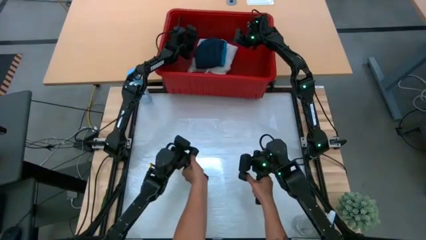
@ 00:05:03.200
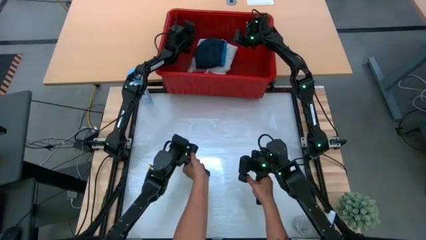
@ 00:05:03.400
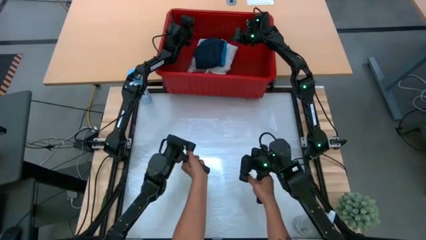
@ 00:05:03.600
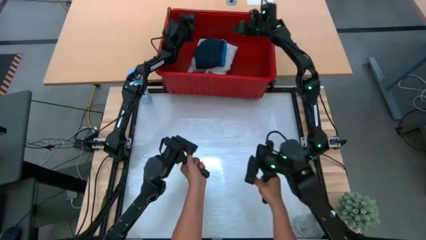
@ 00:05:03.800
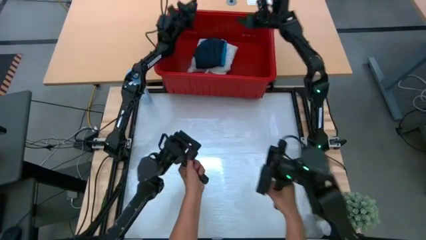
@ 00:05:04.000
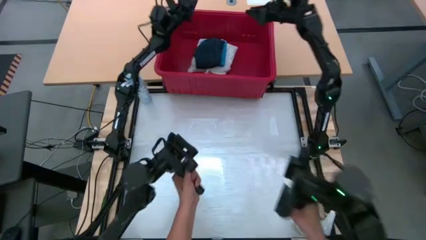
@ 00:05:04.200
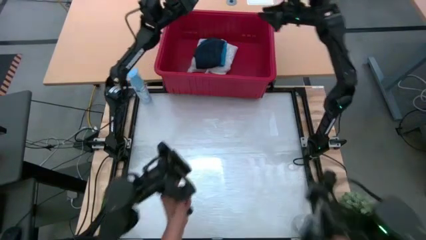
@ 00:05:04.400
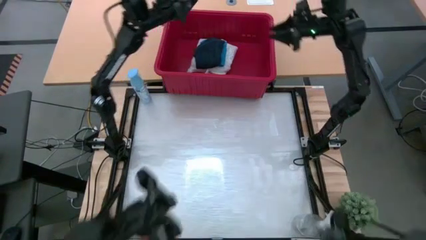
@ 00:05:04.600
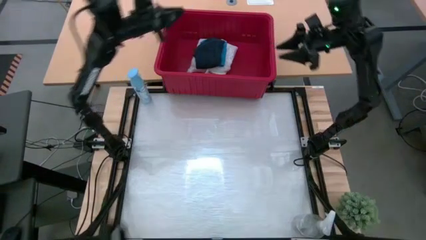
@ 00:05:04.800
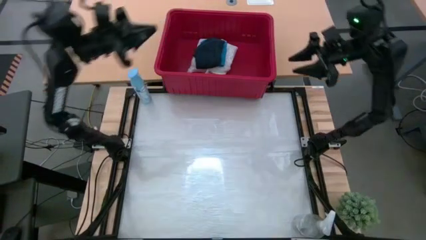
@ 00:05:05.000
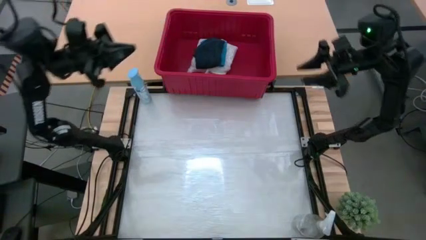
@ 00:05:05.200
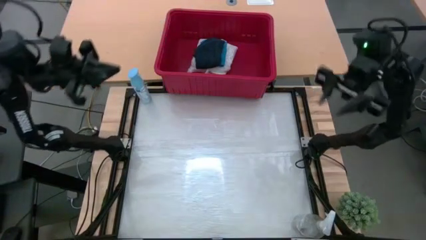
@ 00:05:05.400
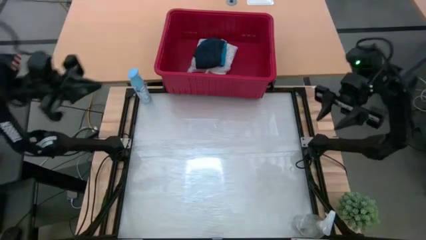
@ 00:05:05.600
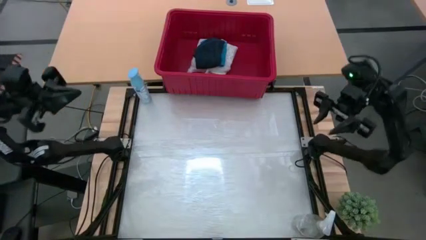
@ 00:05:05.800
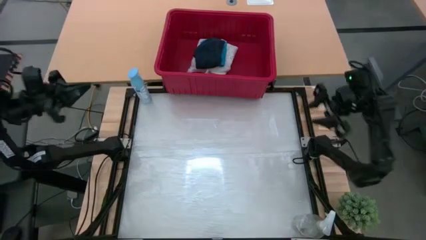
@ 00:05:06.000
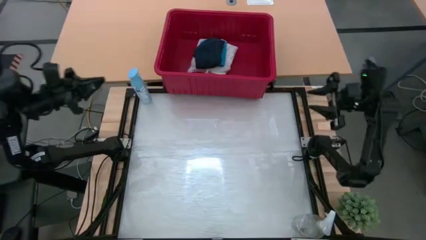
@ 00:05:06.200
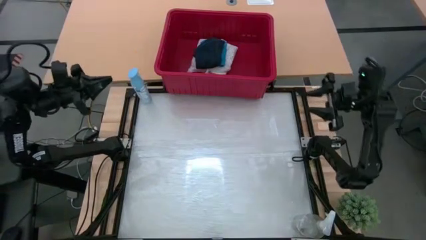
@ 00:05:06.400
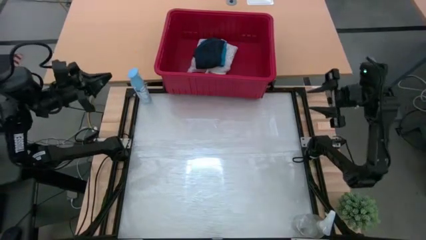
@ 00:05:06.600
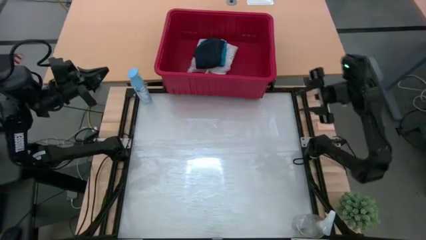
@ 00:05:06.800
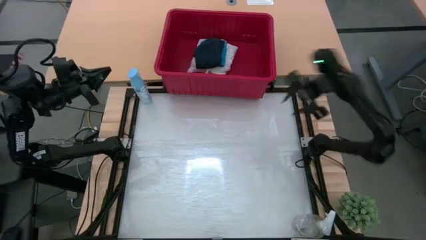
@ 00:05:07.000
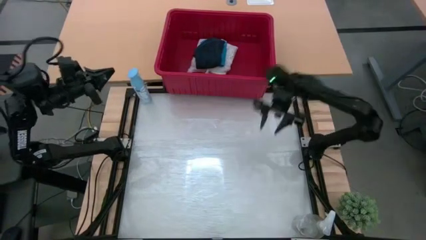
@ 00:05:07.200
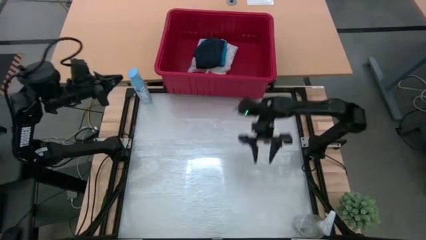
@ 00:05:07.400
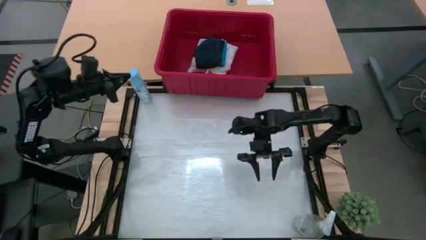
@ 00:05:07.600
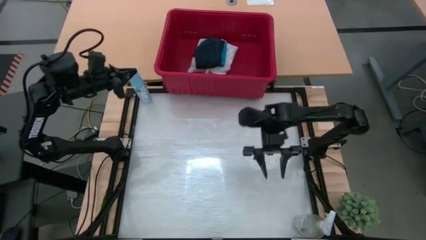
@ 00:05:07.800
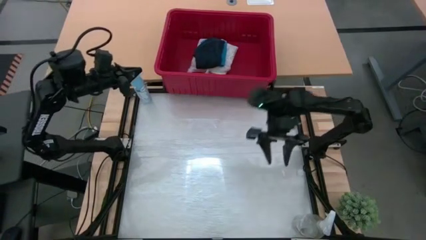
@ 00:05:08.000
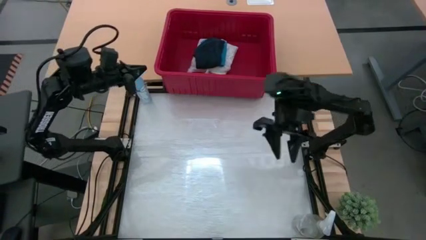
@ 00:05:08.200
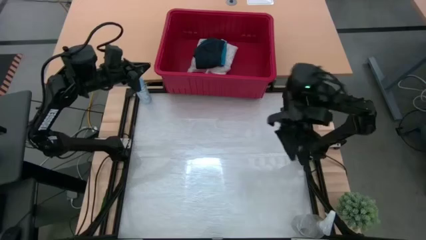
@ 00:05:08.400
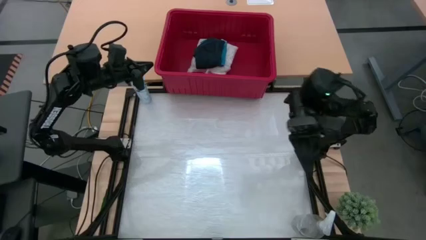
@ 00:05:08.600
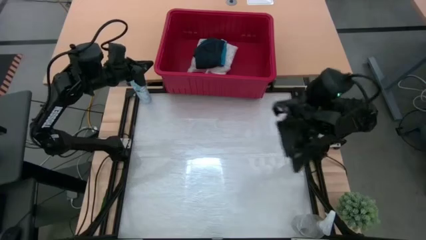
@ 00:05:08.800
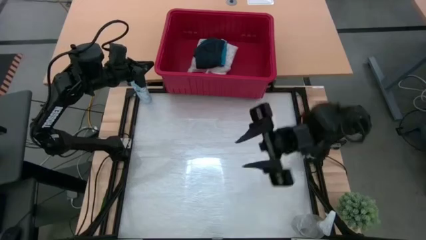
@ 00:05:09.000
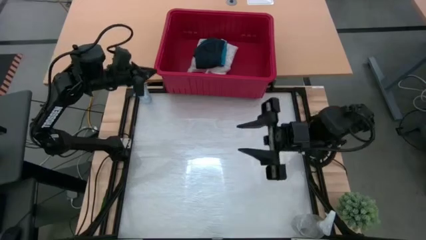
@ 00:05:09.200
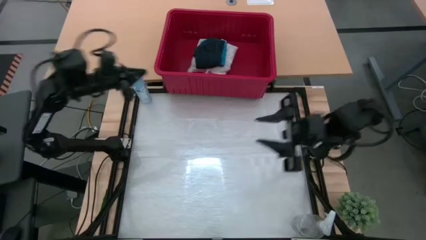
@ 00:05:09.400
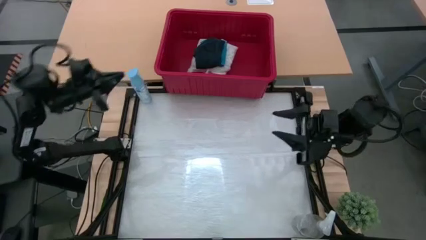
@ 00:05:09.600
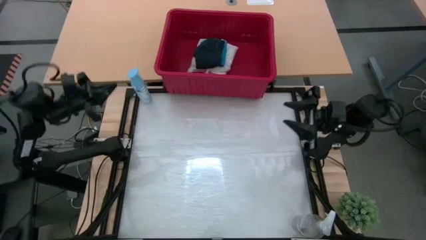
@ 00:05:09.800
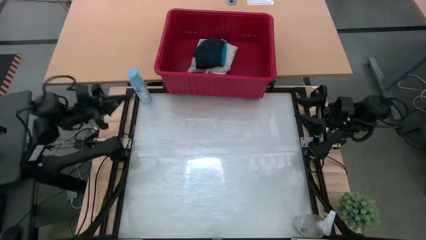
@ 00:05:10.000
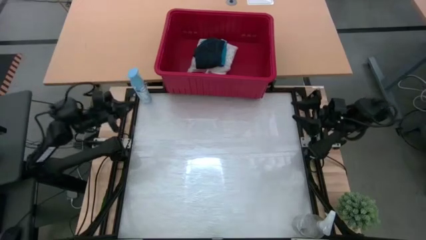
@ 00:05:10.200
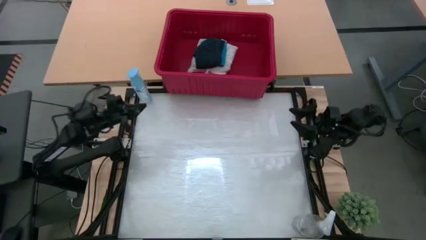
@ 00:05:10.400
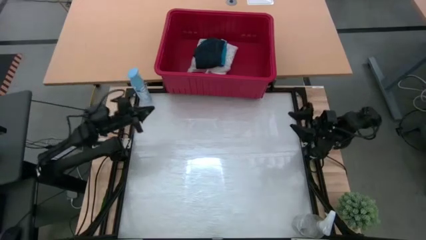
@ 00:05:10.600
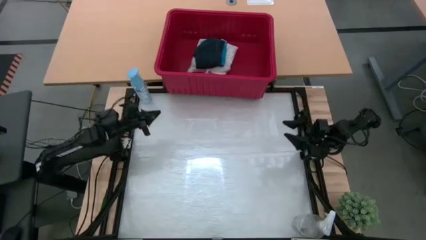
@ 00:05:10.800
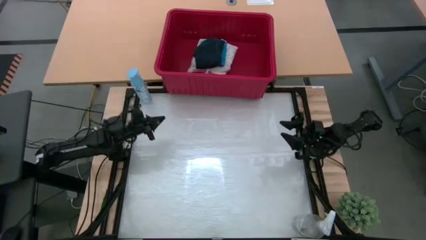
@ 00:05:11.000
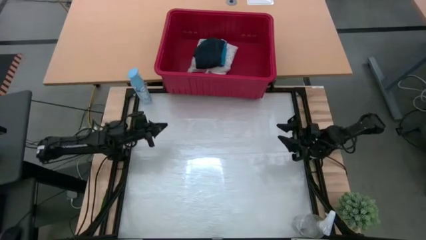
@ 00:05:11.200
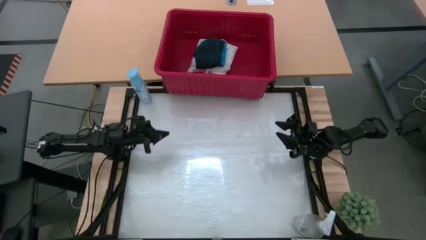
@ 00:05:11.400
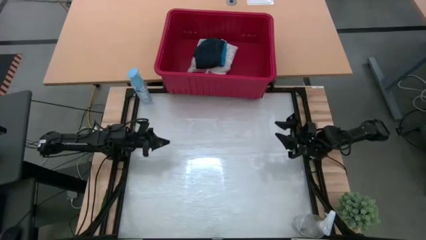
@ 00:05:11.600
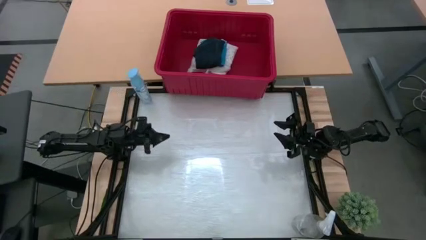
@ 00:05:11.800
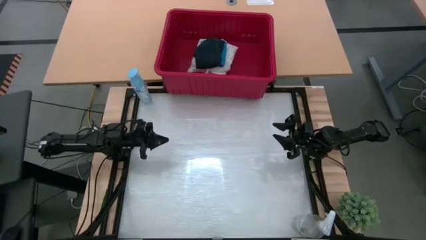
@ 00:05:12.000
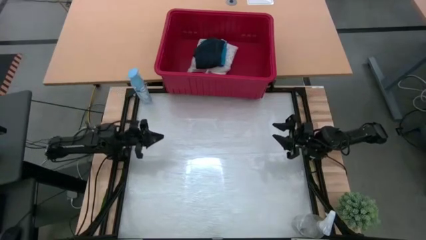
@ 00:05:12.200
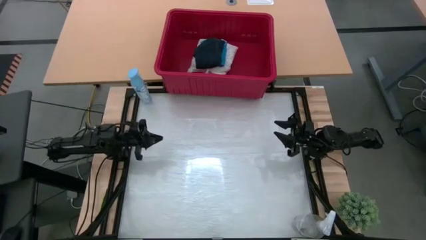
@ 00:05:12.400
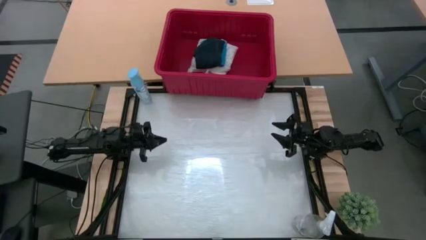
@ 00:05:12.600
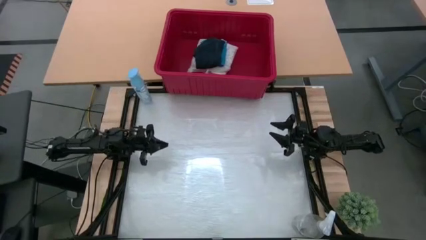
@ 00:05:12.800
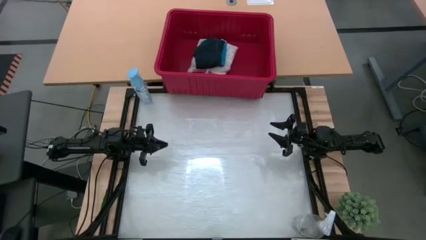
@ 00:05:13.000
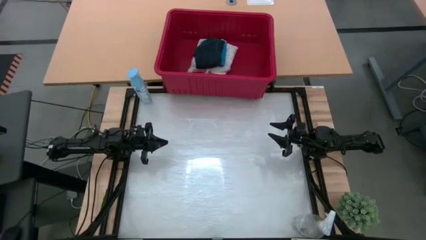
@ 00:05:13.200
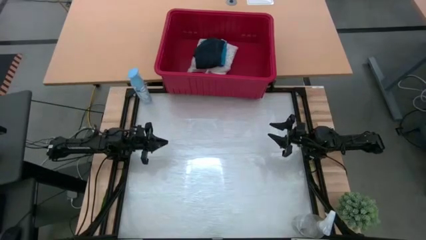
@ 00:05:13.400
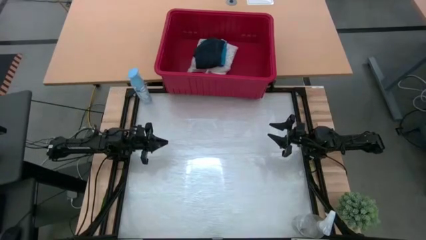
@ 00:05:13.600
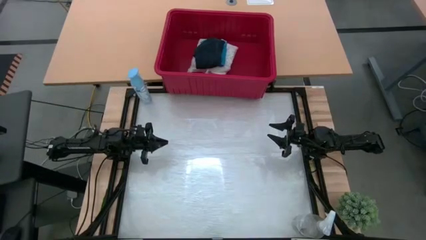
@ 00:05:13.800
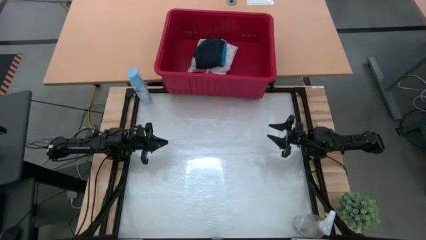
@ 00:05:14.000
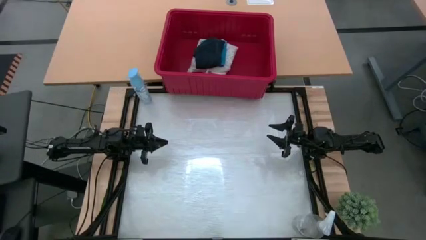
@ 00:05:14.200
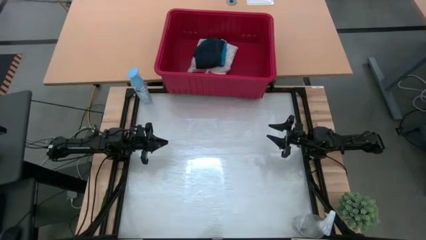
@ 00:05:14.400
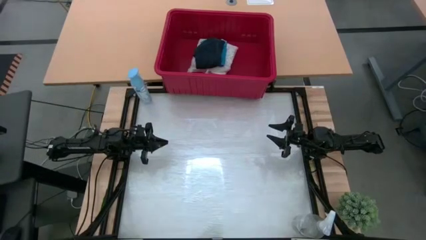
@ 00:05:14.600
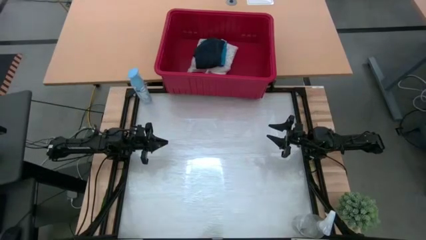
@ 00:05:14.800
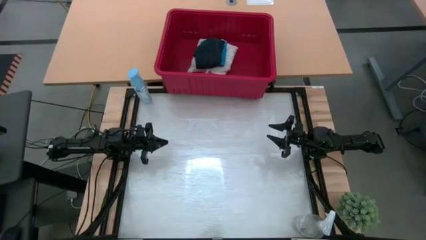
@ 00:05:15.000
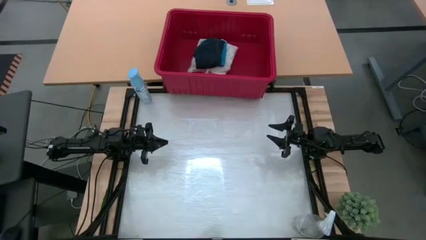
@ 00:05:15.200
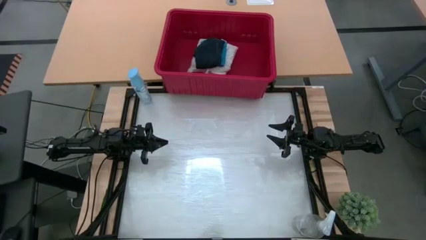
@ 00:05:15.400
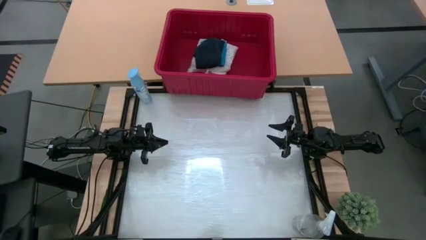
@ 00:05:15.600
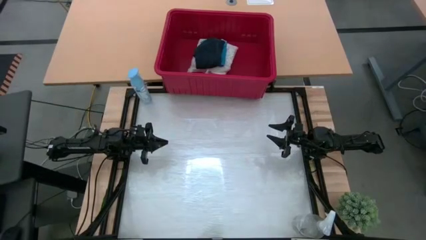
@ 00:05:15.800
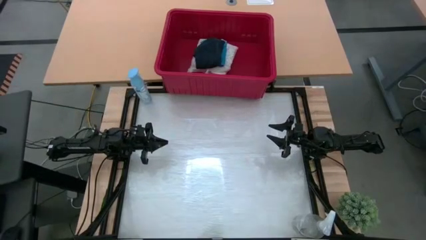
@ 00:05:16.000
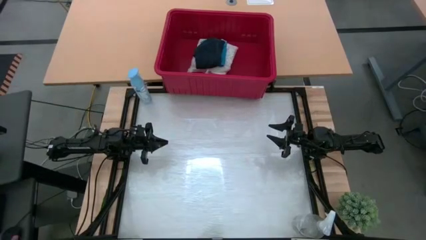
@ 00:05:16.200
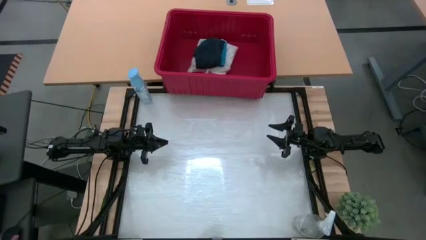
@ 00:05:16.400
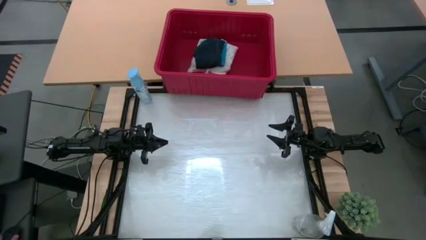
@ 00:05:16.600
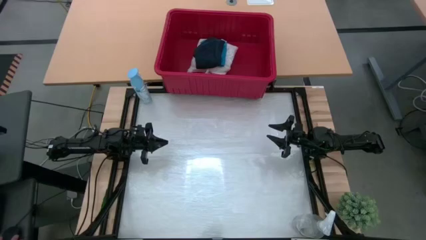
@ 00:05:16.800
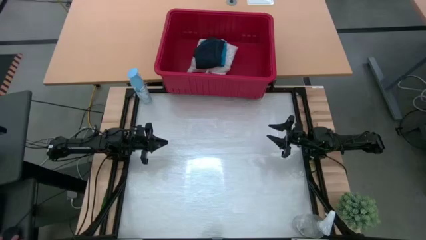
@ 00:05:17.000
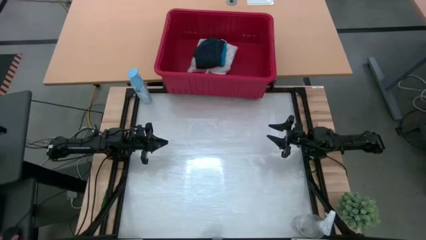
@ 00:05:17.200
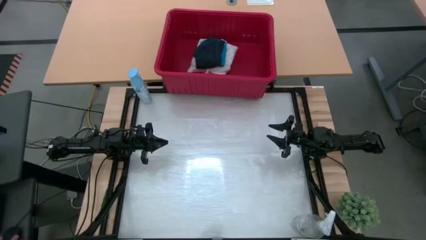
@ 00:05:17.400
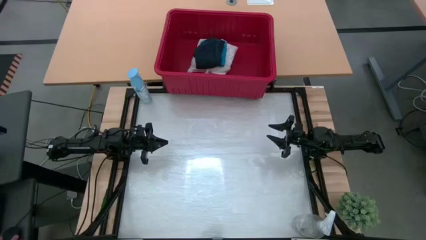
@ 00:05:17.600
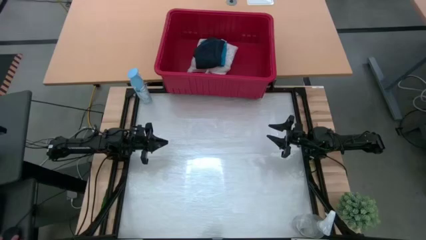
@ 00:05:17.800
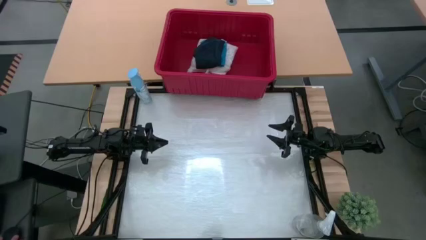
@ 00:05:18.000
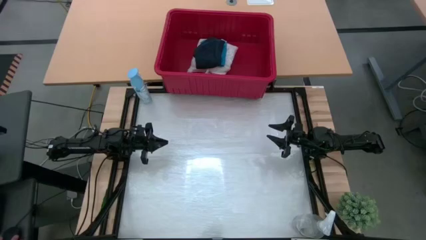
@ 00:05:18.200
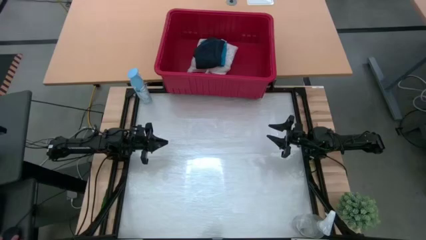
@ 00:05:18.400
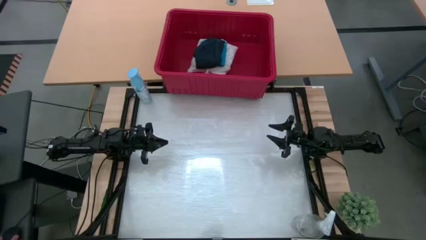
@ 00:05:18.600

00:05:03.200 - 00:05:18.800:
Task: Fold laundry
Return to Home Position
